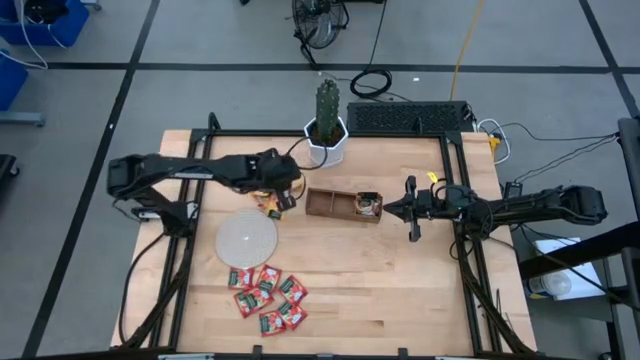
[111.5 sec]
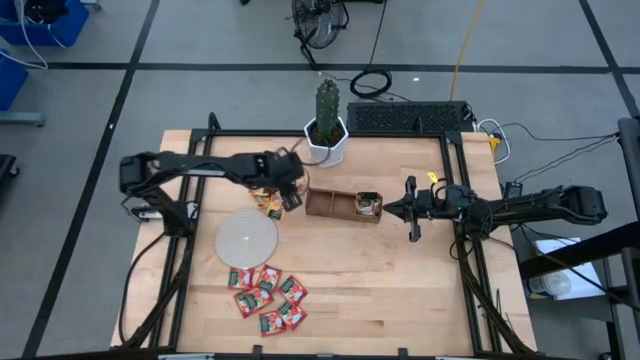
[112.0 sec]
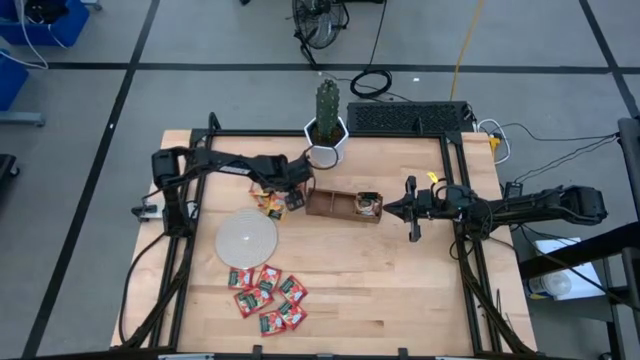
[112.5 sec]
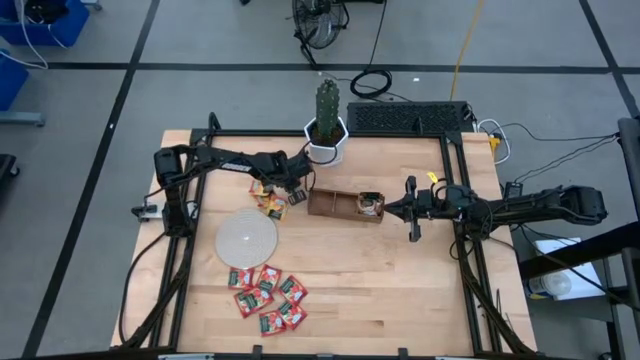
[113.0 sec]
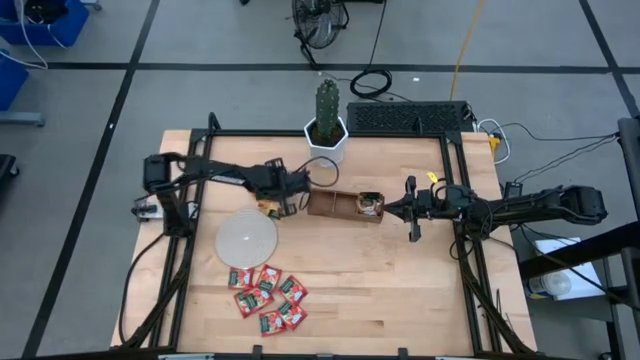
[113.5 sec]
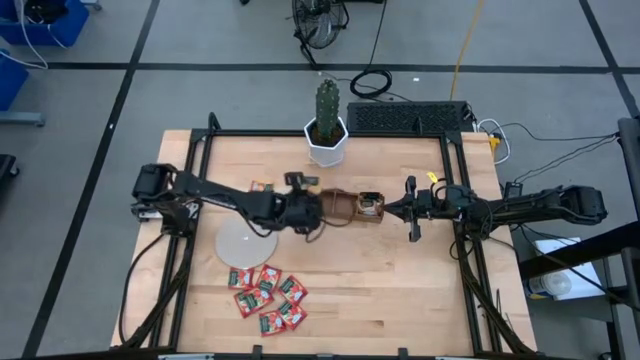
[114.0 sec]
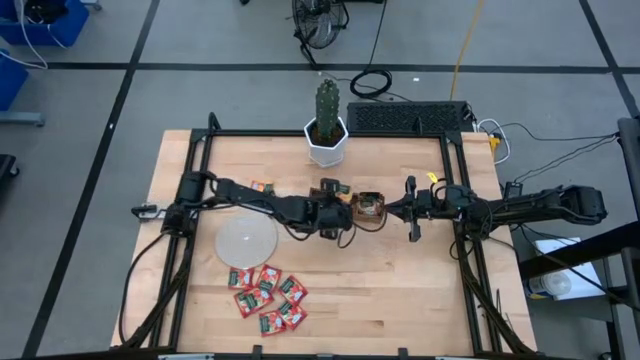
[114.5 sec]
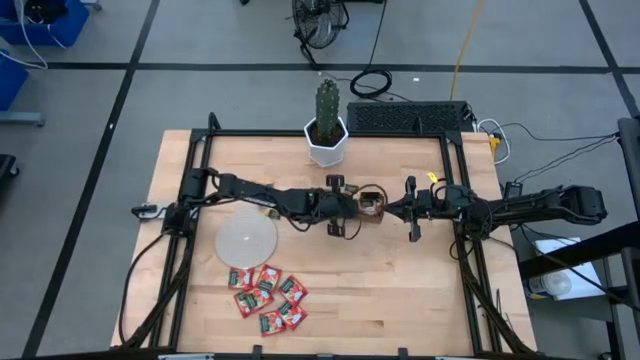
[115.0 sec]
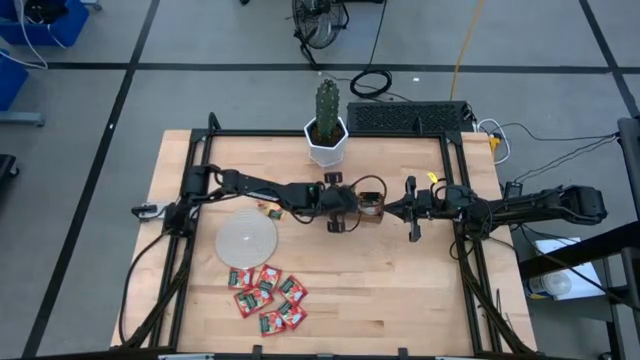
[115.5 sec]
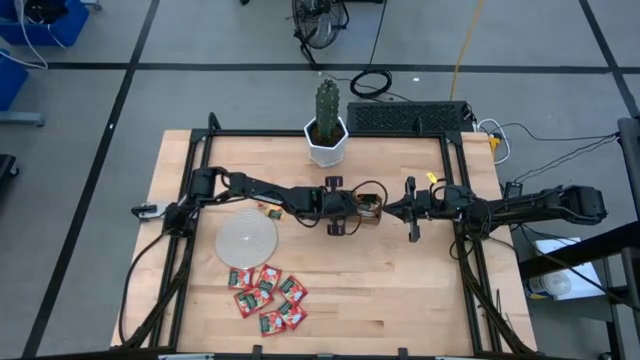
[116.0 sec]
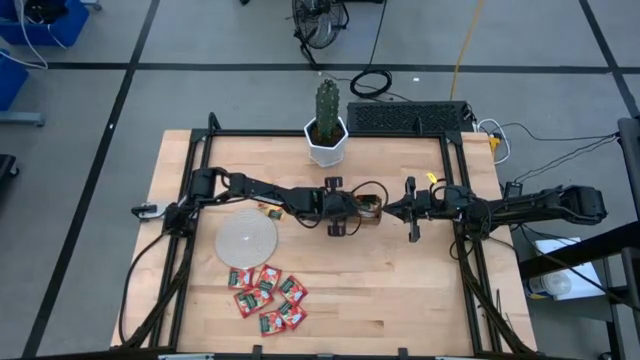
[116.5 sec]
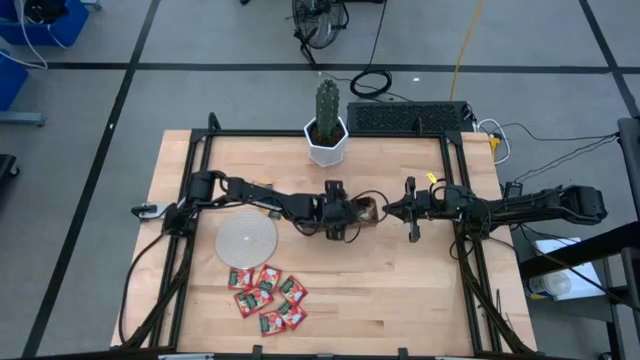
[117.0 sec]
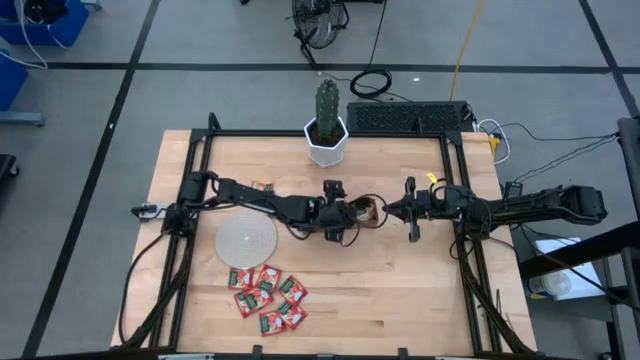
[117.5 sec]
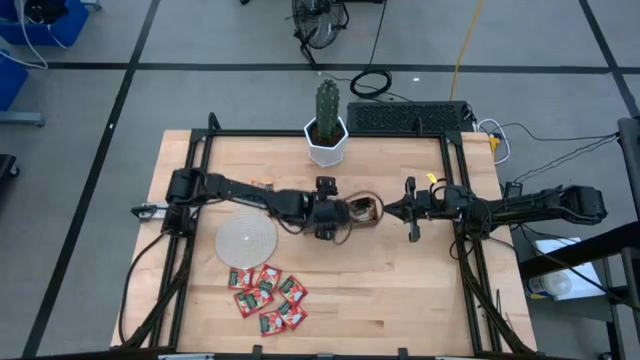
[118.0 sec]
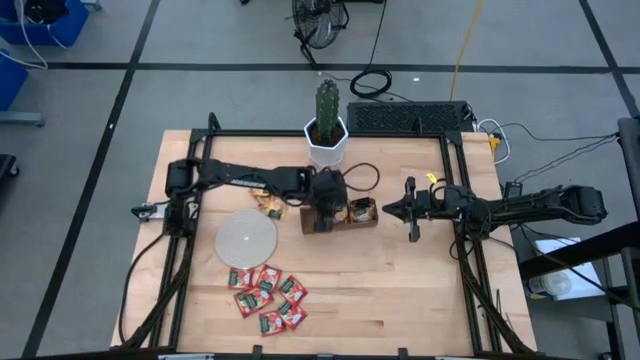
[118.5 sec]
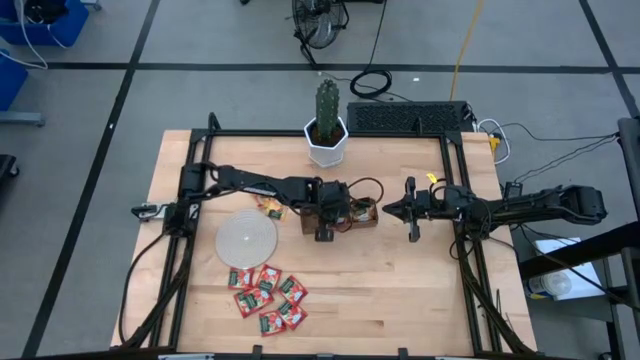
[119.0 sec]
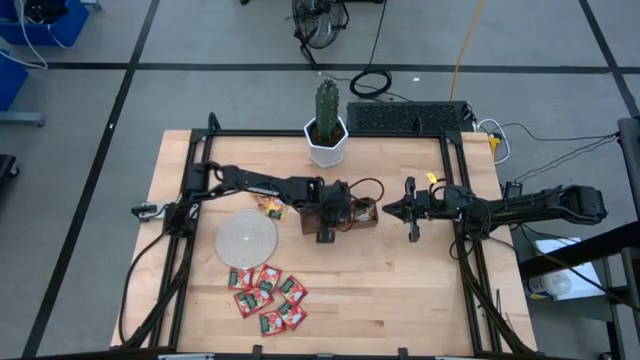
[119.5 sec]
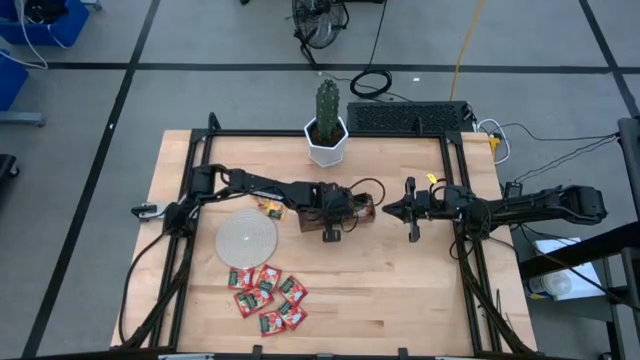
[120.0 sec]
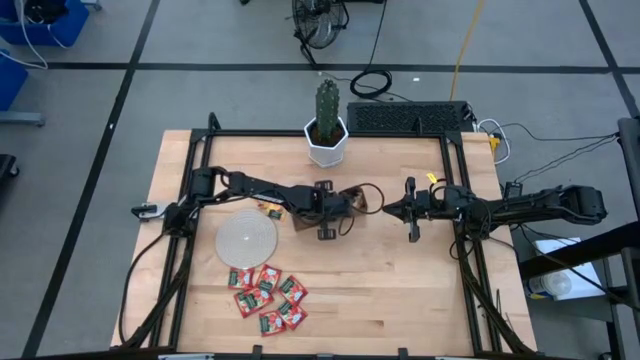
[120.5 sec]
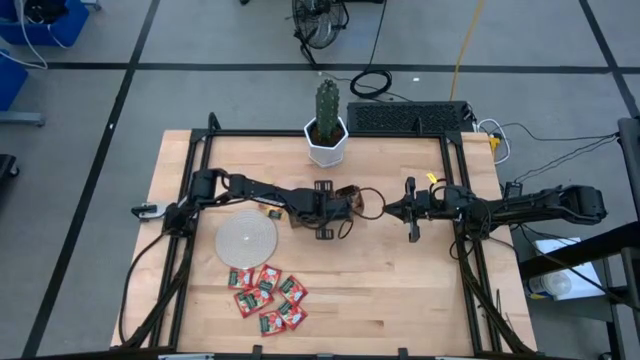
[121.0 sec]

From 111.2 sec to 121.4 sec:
Task: Pick & Place Tea
Put the yellow tea bag into the middle section of the wooden organizer

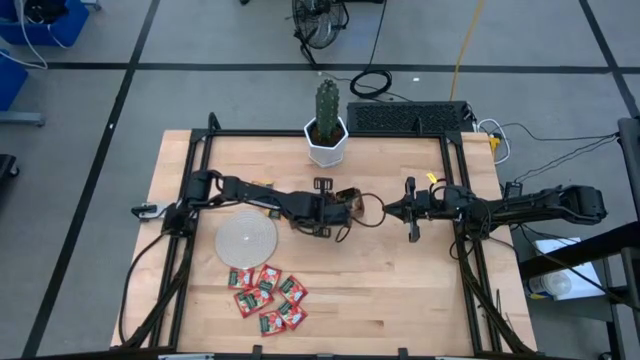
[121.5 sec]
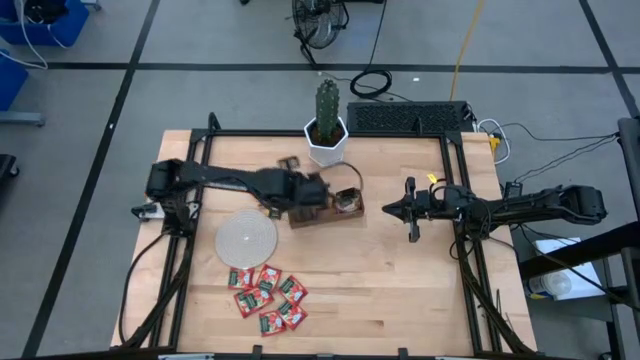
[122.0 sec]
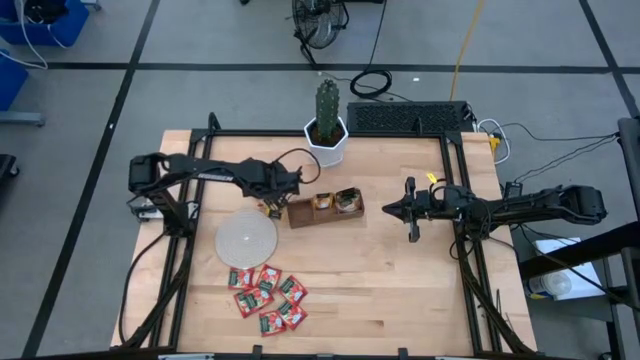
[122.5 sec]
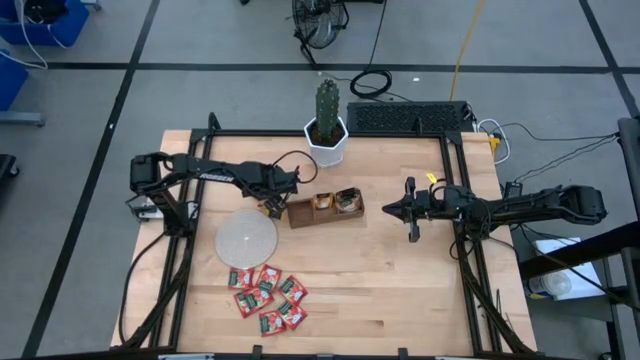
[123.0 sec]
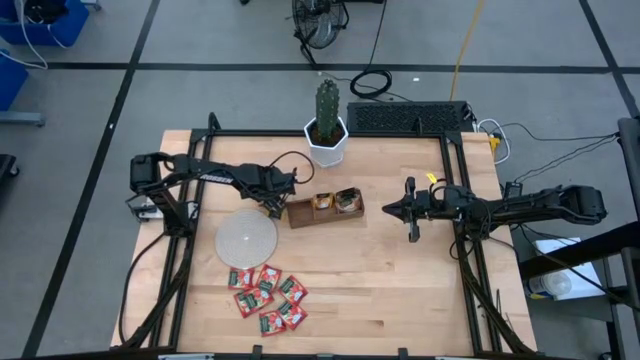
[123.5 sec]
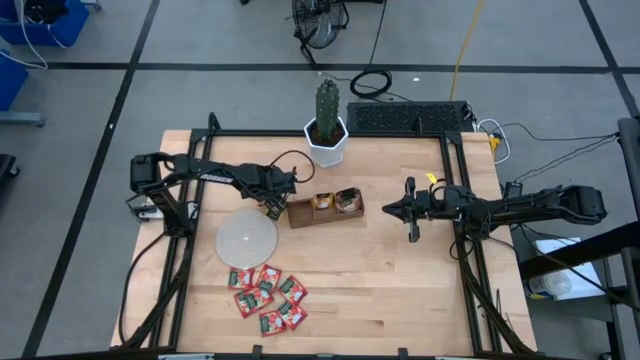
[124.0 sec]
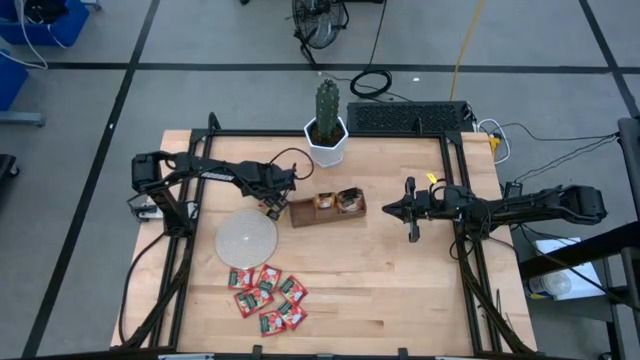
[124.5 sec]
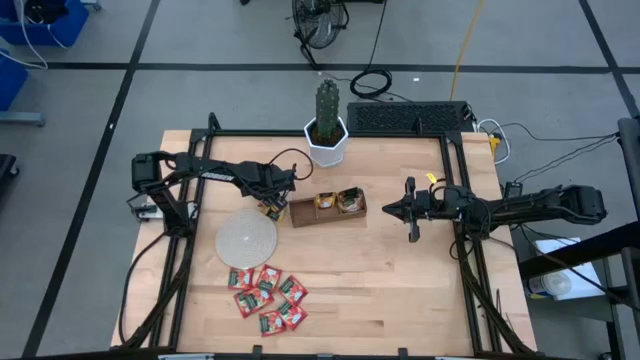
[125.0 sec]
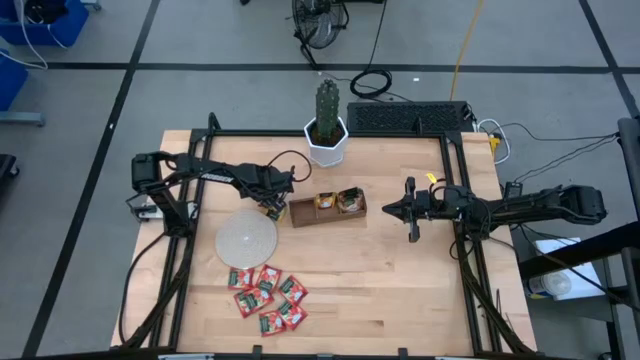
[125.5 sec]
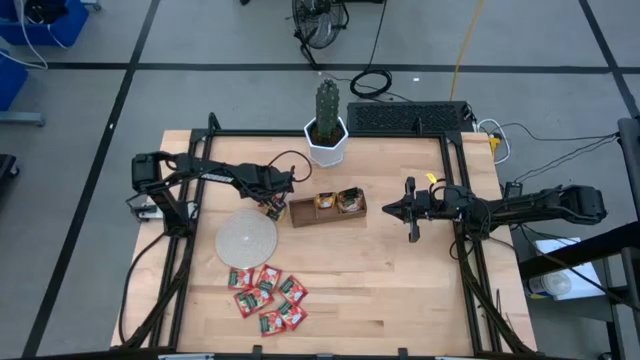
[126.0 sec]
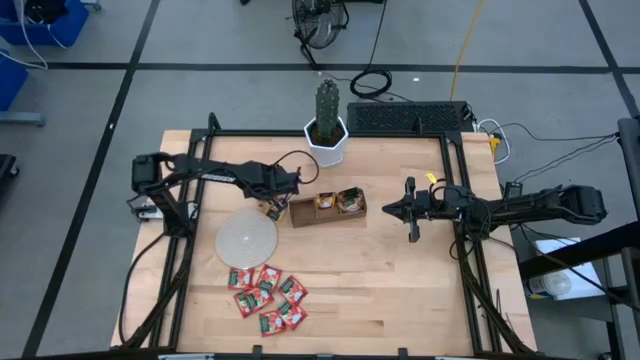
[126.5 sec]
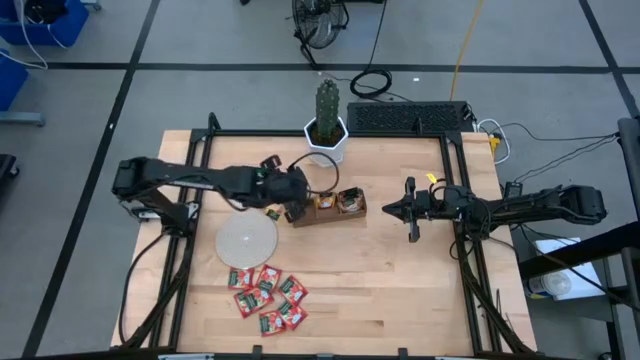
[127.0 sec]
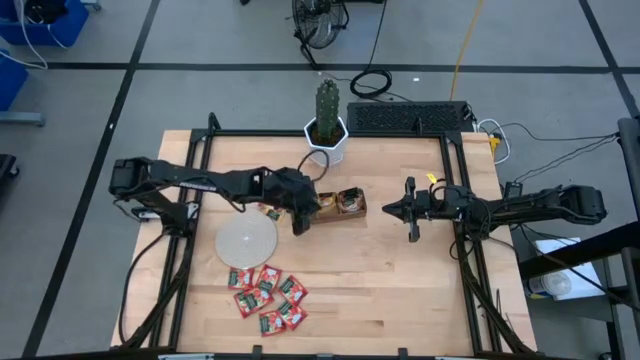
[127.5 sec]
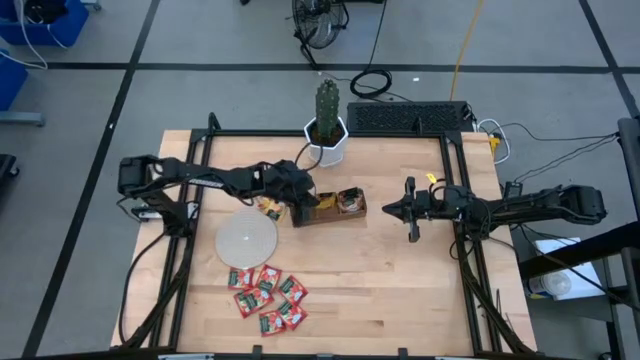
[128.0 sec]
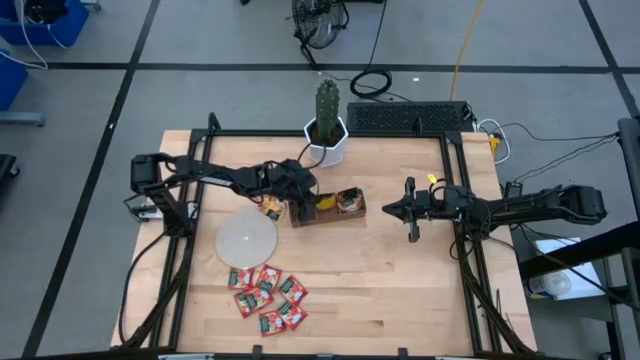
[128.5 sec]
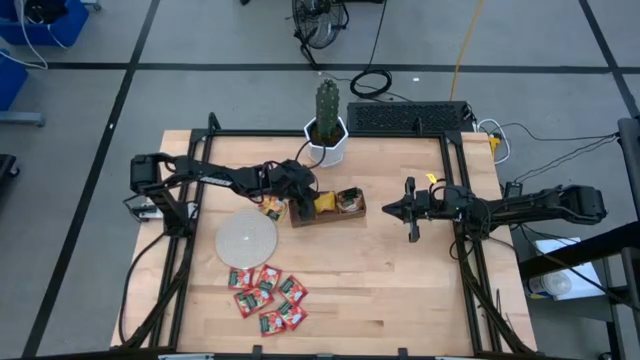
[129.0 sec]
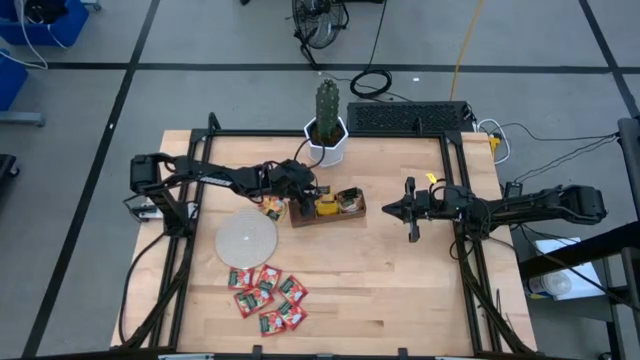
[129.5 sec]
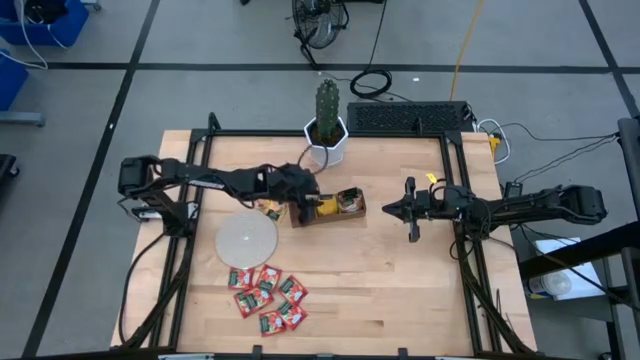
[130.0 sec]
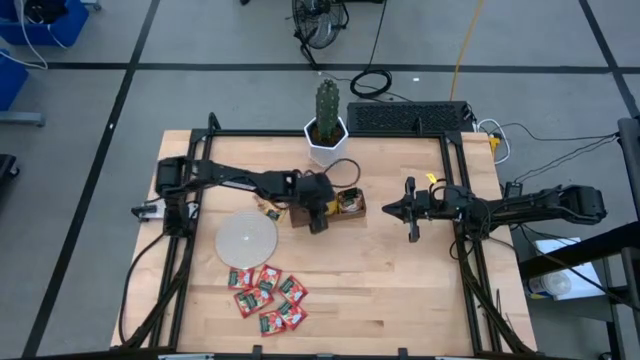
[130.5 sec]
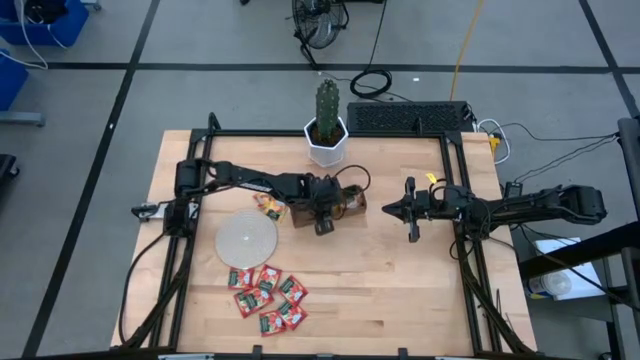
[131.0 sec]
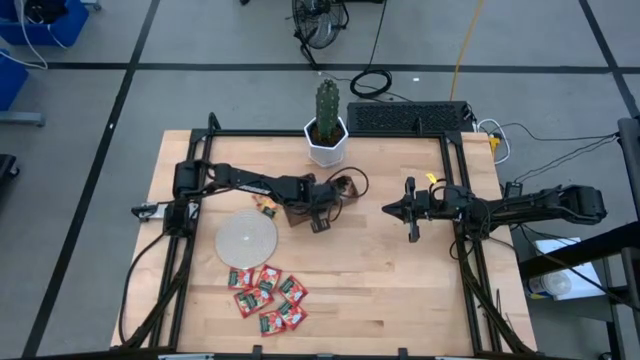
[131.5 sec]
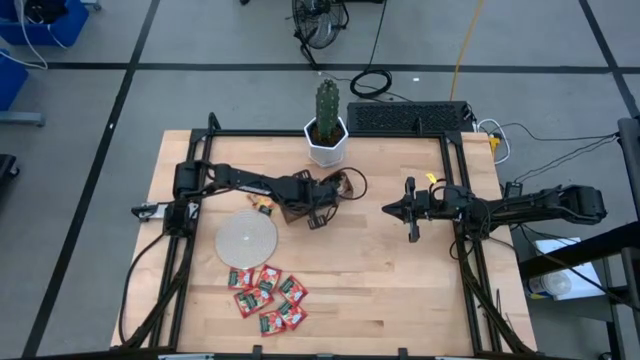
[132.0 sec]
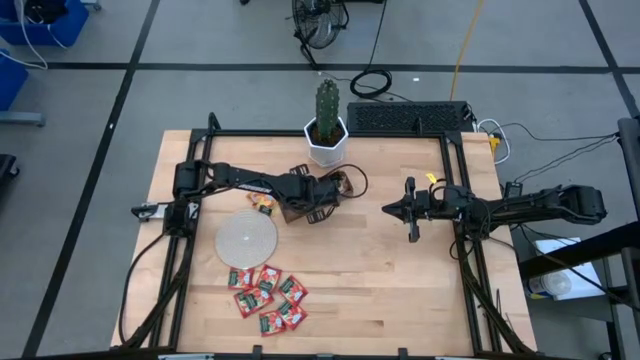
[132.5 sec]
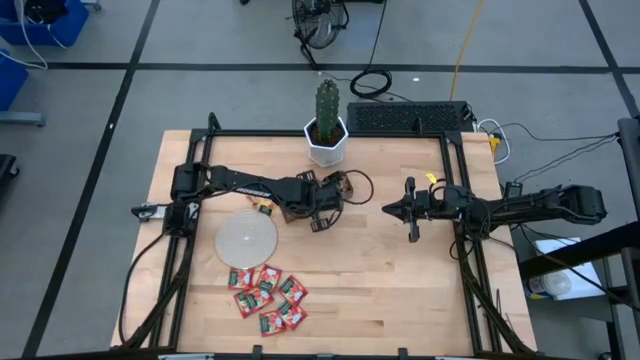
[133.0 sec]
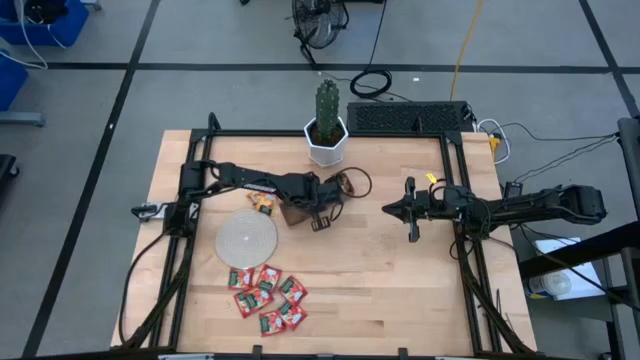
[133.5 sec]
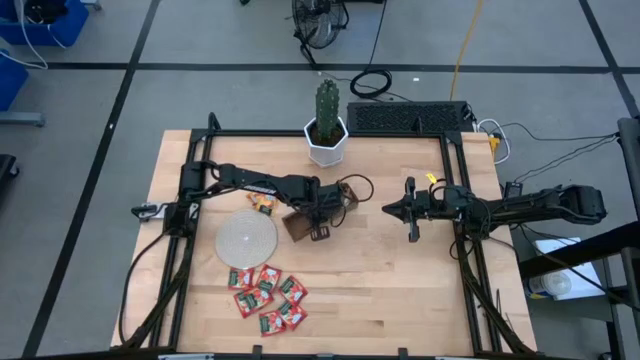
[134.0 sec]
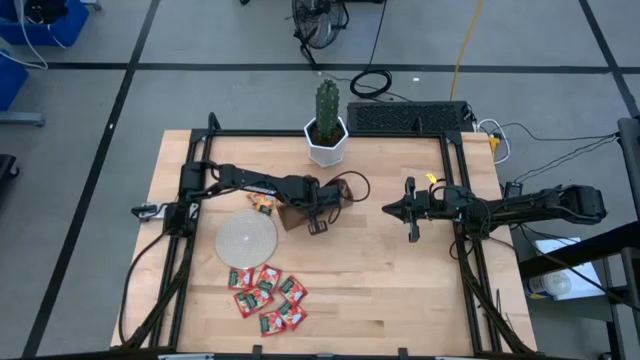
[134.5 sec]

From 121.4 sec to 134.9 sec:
Put the yellow tea bag into the middle section of the wooden organizer
